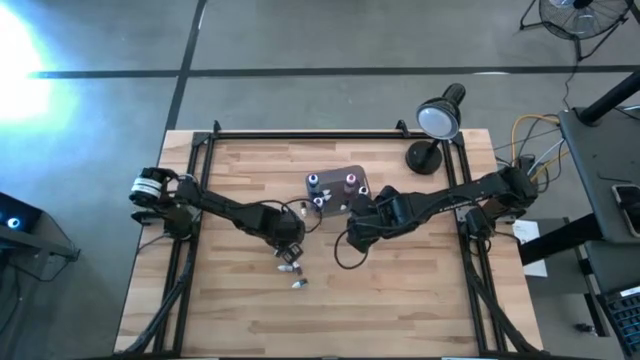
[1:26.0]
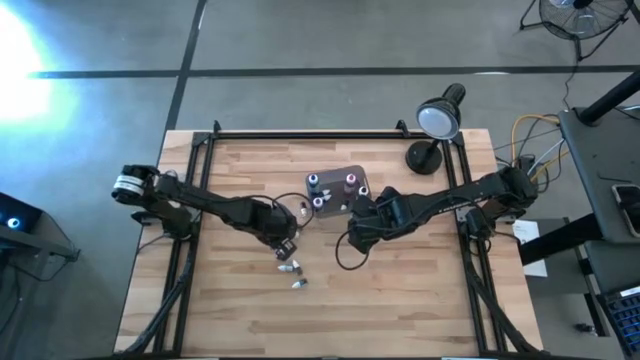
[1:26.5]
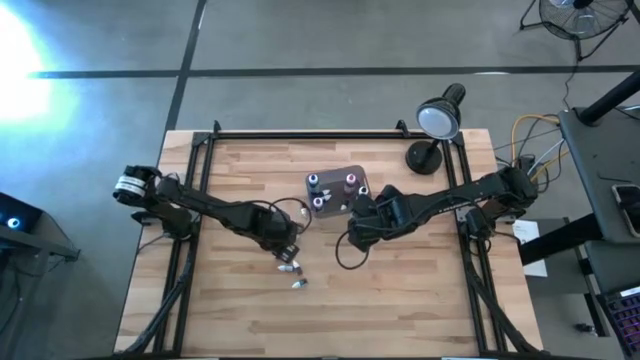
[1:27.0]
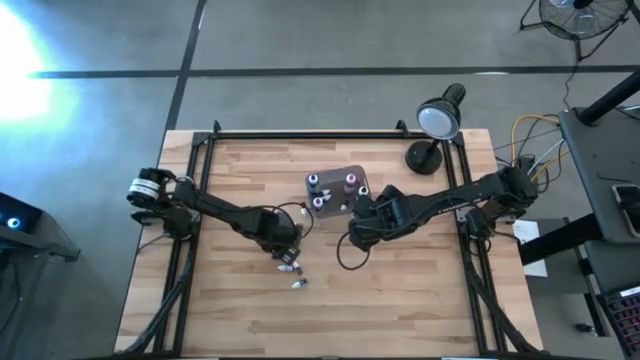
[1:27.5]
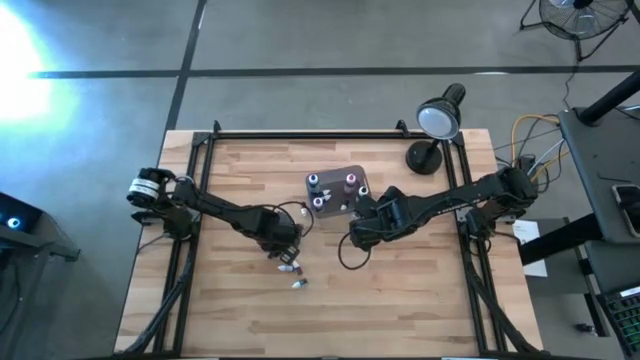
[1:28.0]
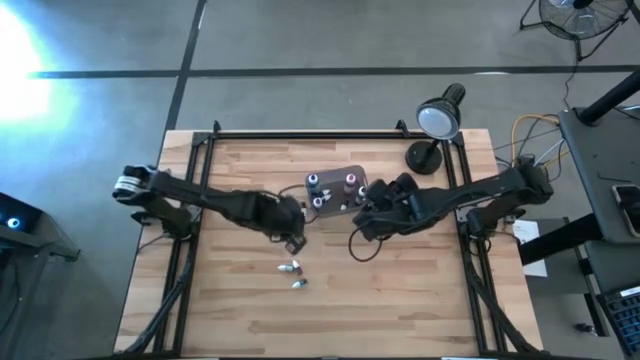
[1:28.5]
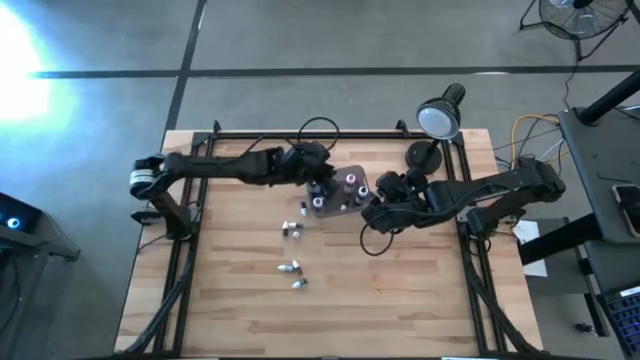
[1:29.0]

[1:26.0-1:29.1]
Task: Pick & Place food coloring
Put the small black food coloring bottle into the black transparent bin

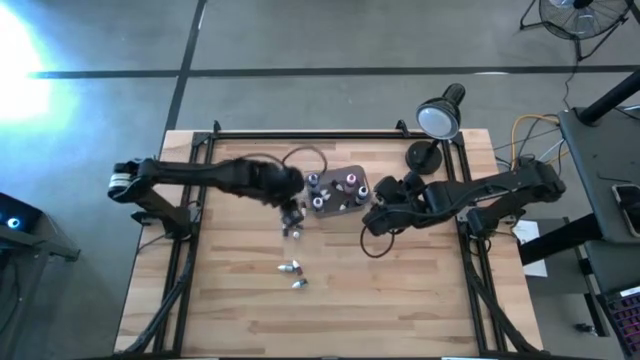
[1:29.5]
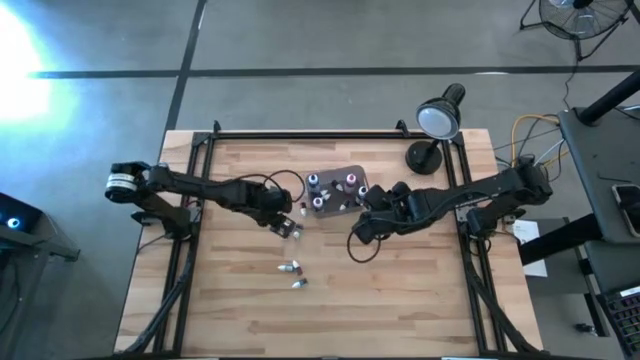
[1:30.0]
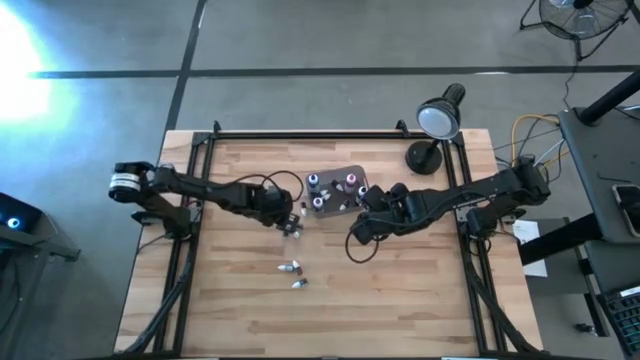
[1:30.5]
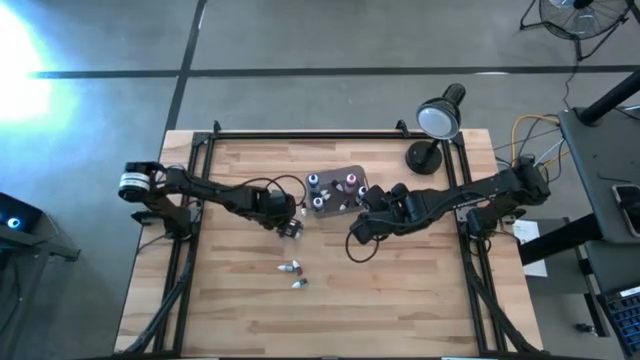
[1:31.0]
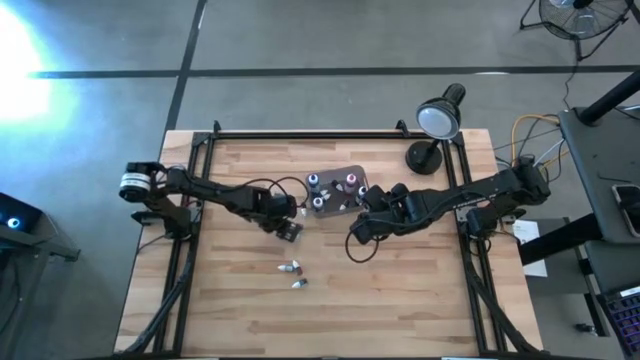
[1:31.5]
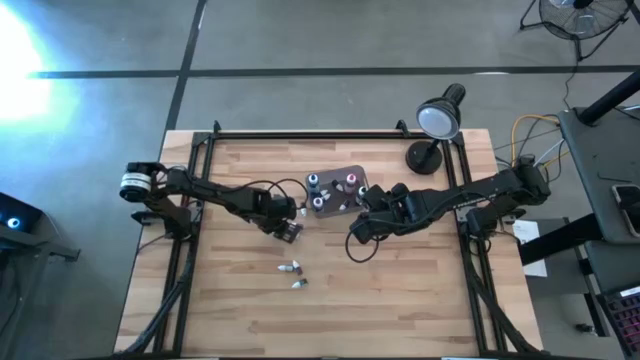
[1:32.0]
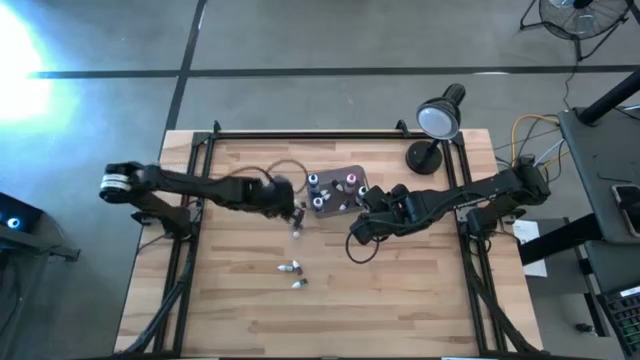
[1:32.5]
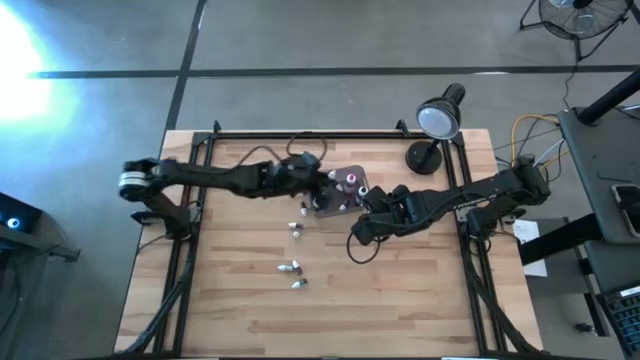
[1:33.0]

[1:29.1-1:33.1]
Put the small dark green food coloring bottle into the black transparent bin

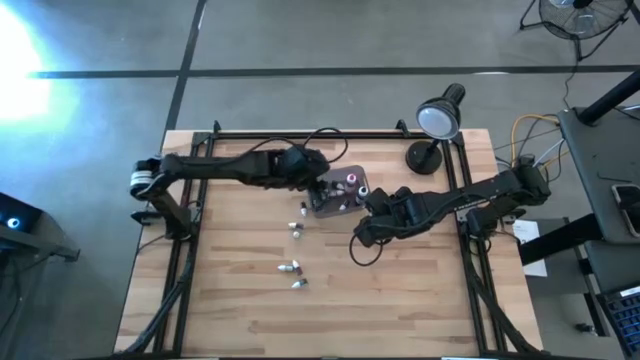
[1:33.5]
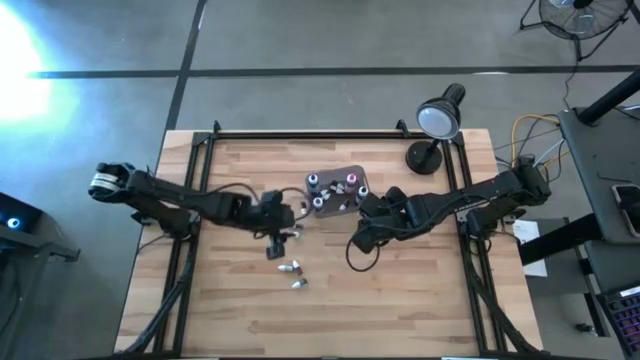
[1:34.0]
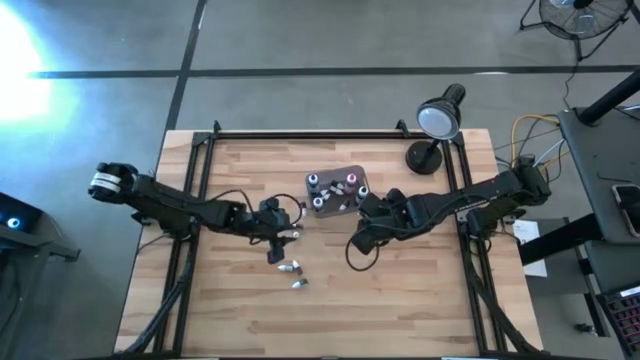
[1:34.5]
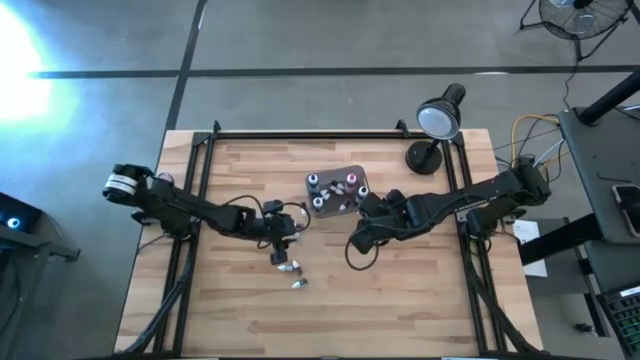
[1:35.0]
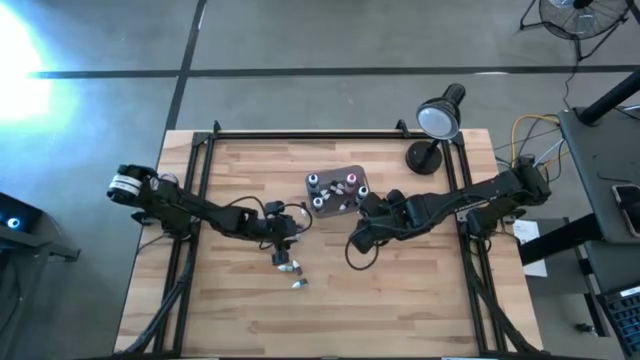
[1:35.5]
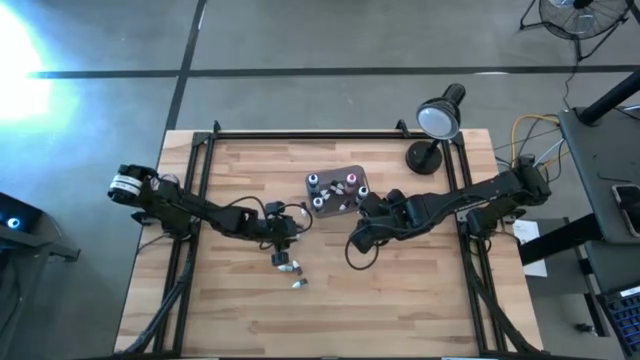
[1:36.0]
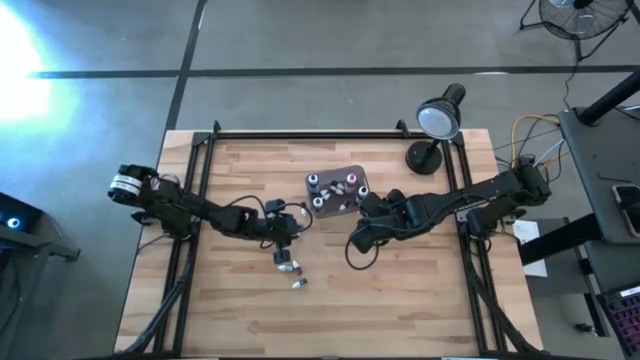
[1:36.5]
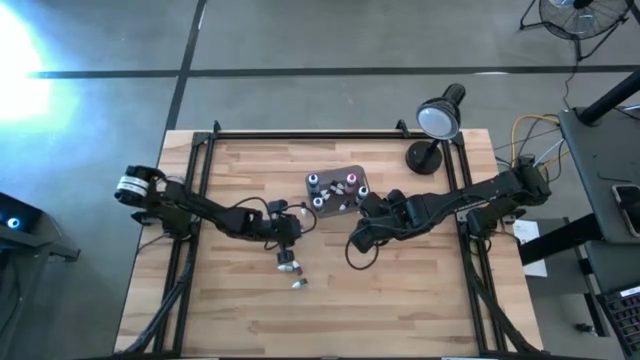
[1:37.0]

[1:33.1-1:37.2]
Put the small blue food coloring bottle into the black transparent bin

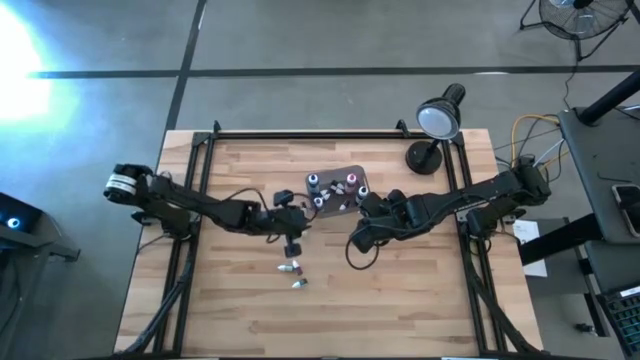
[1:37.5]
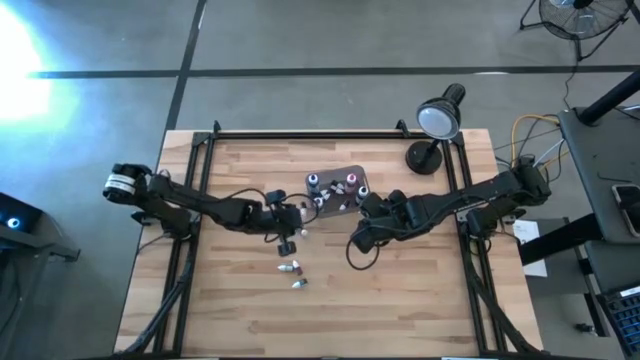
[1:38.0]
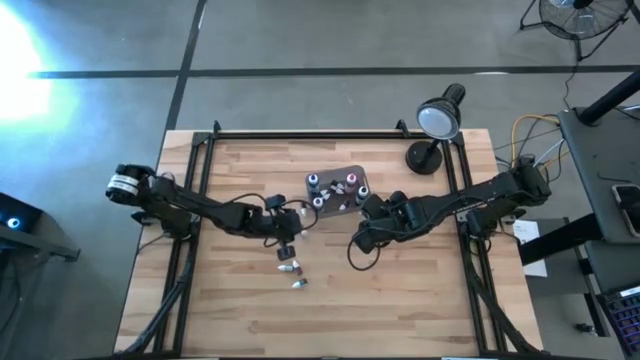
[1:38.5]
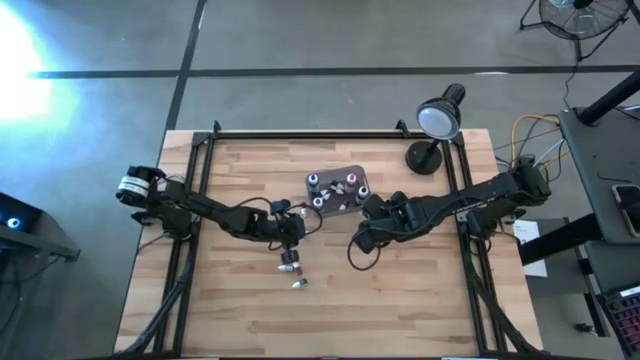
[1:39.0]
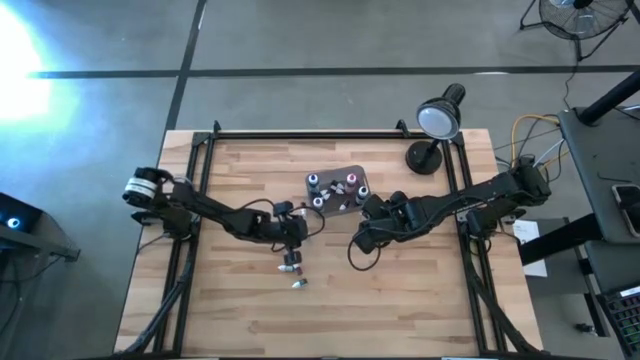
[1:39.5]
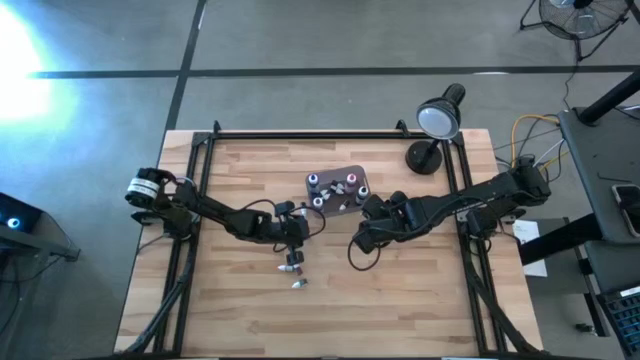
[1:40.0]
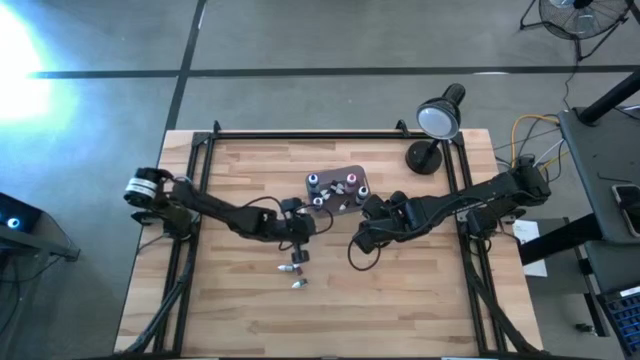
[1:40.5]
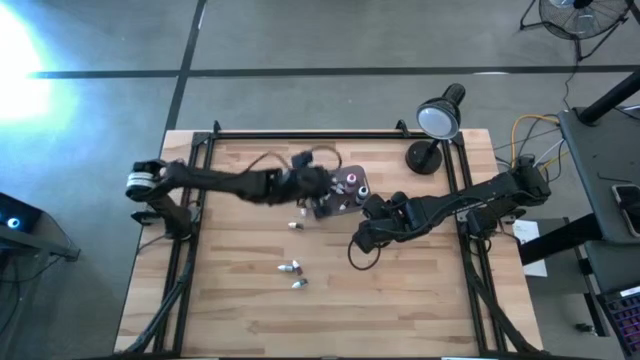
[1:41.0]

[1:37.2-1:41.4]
Put the small blue food coloring bottle into the black transparent bin

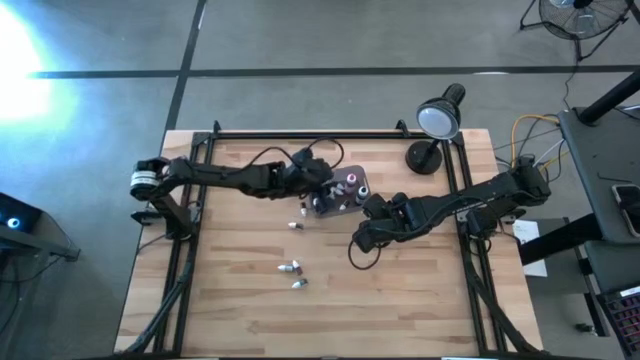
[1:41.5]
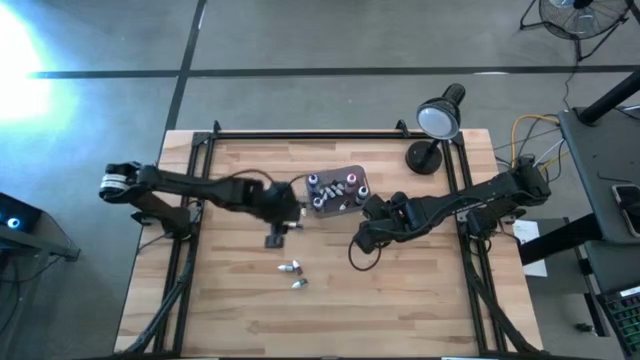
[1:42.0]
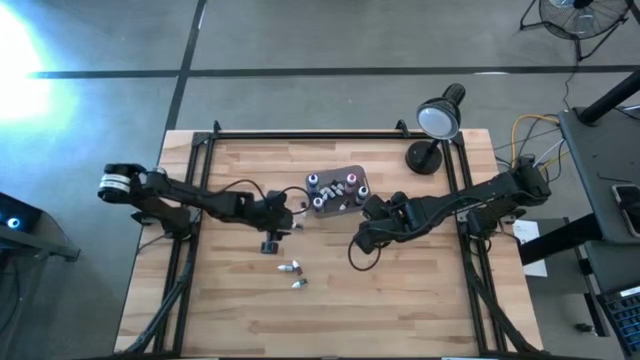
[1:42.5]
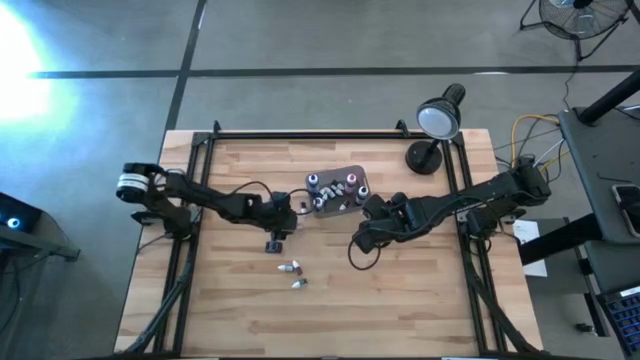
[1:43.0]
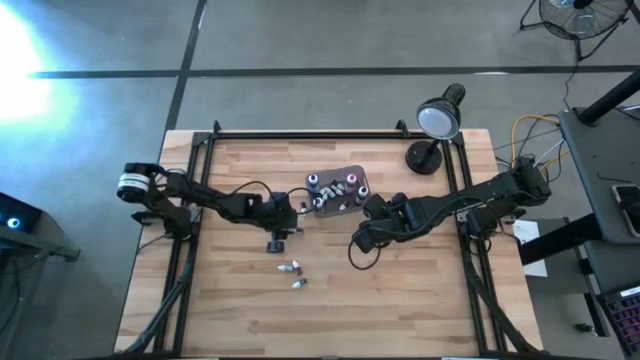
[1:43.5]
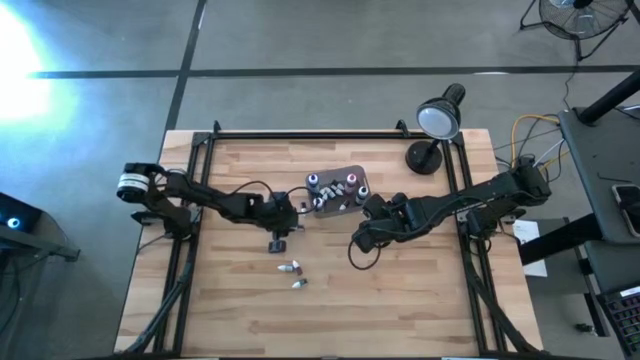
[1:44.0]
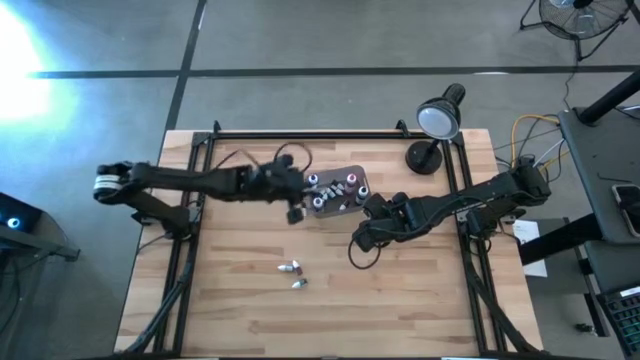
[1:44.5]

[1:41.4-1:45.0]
Put the small black food coloring bottle into the black transparent bin

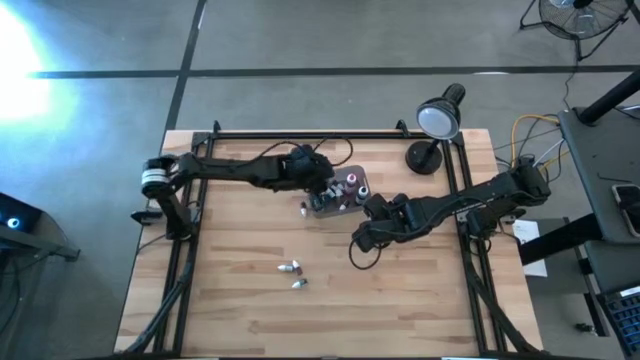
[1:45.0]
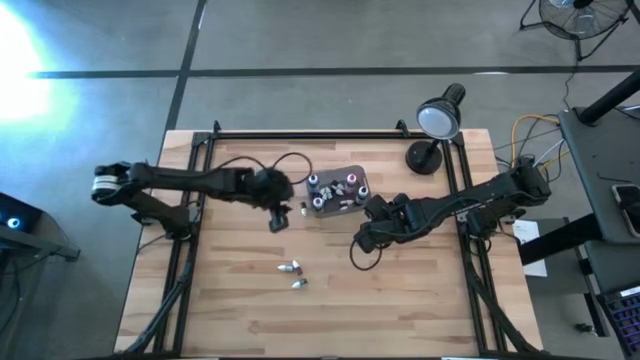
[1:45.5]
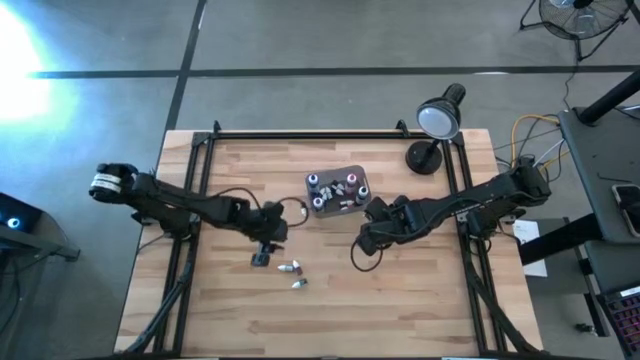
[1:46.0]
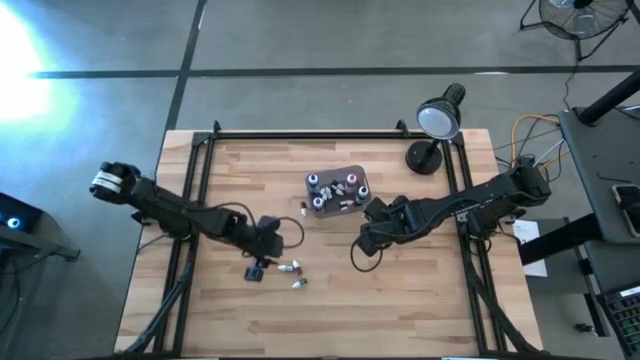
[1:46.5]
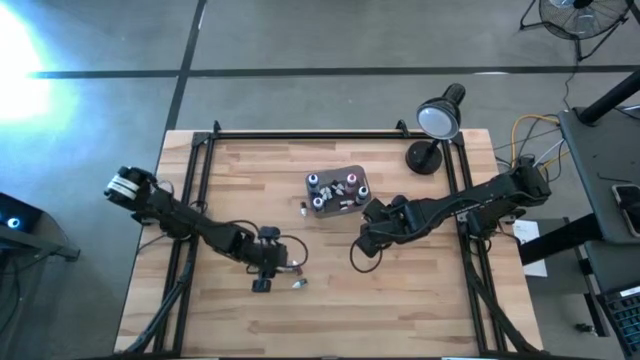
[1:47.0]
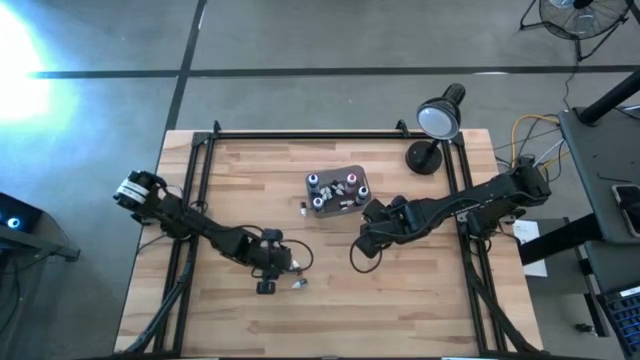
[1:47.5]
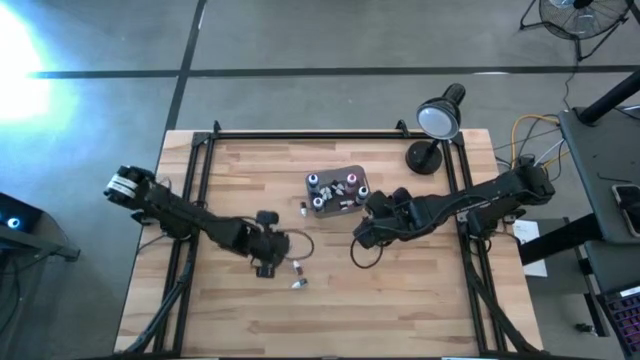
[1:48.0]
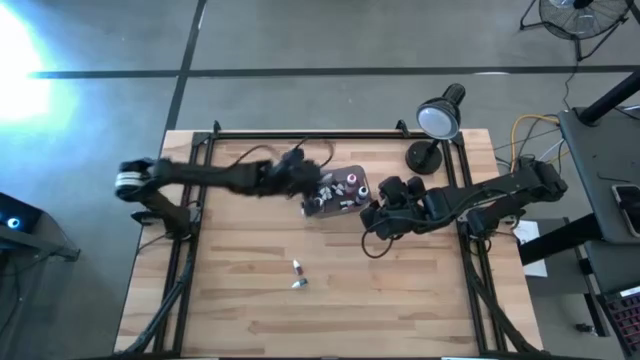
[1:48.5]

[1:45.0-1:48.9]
Put the small green food coloring bottle into the black transparent bin
